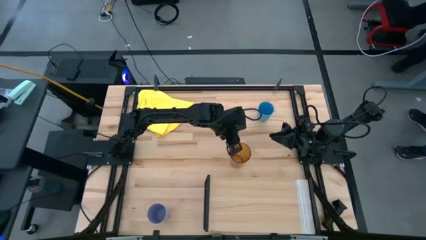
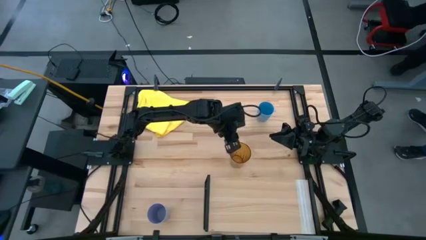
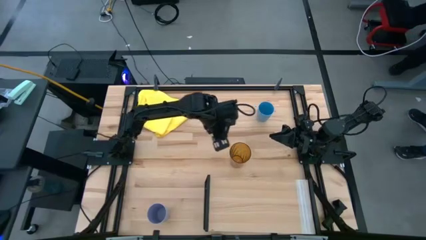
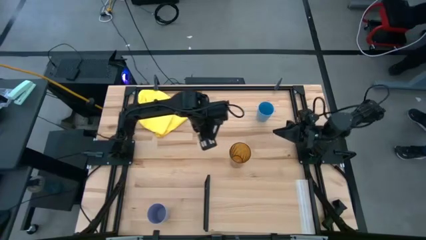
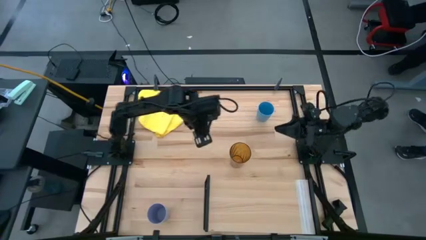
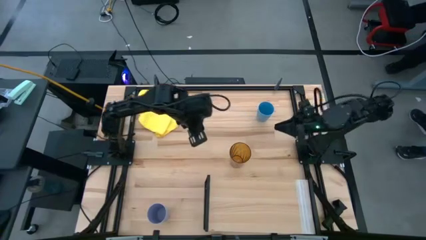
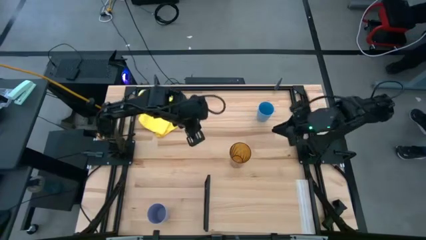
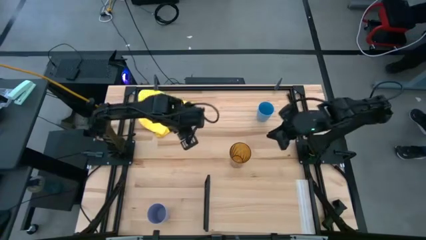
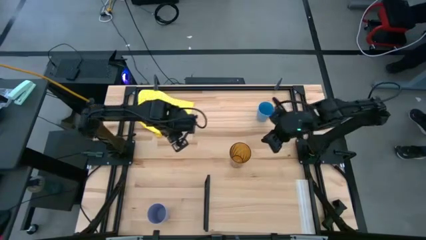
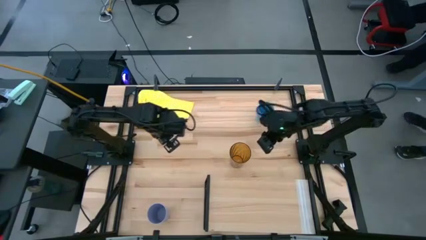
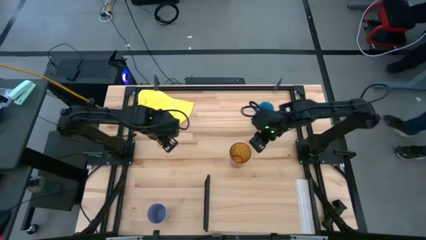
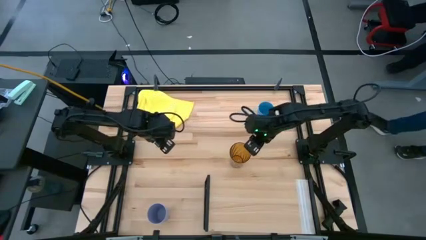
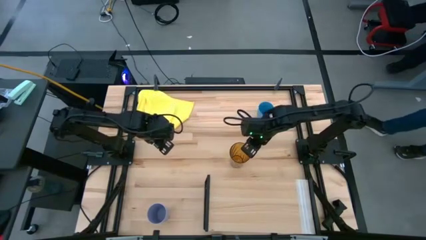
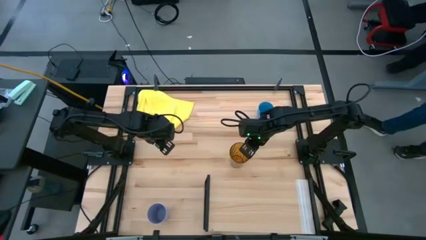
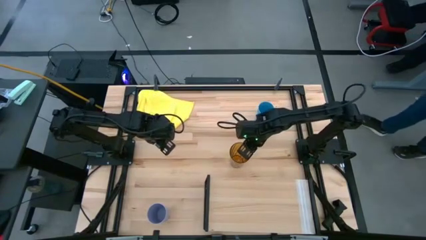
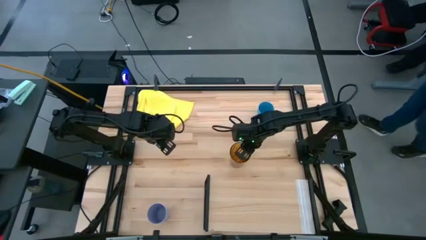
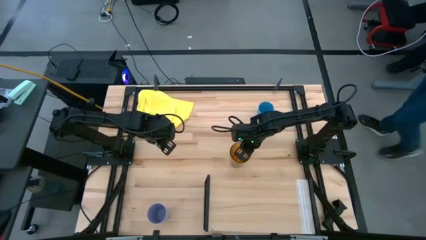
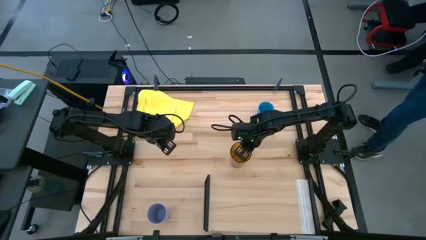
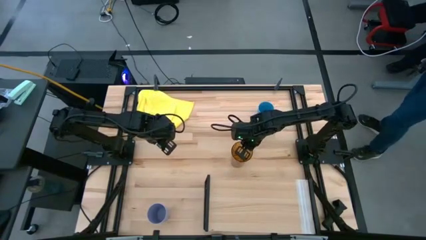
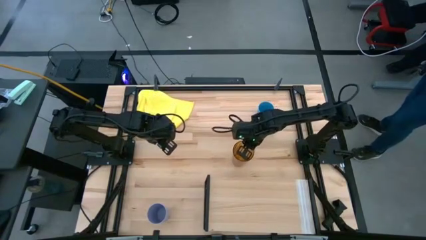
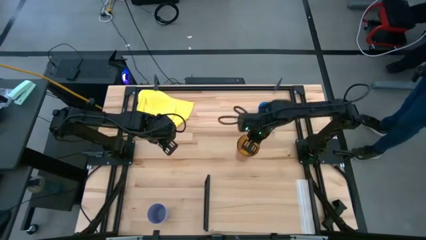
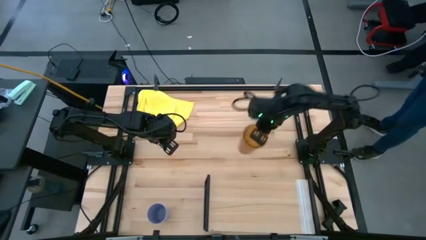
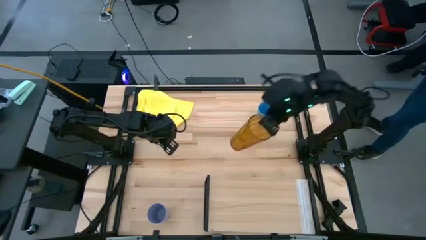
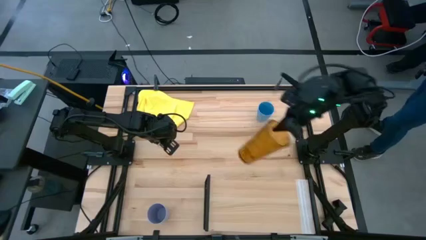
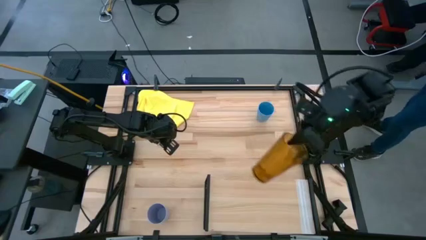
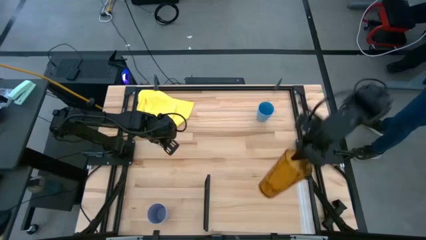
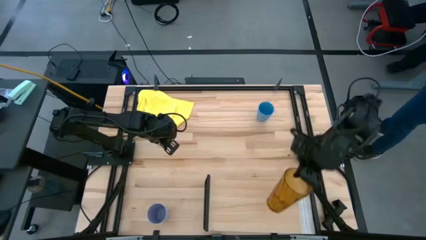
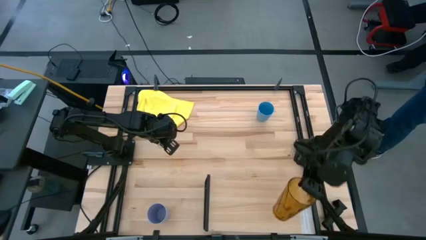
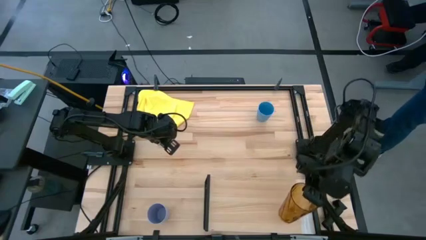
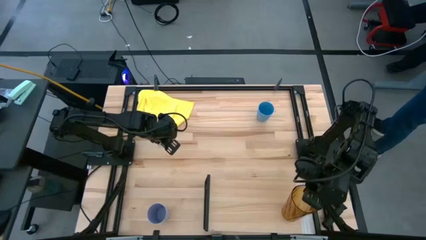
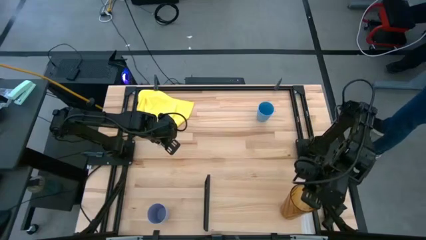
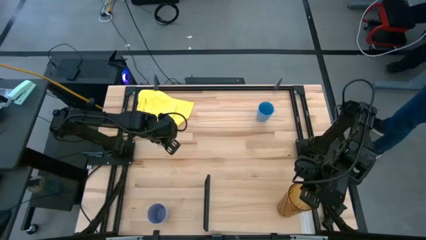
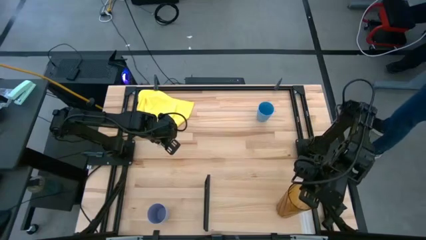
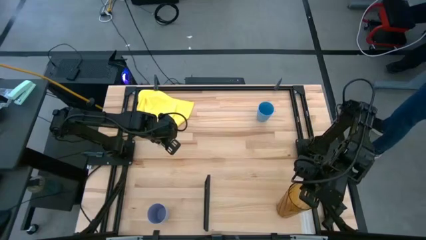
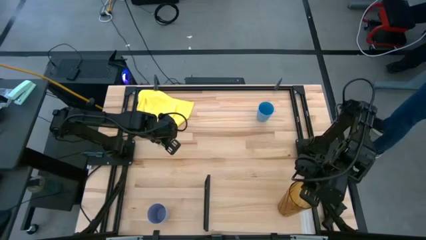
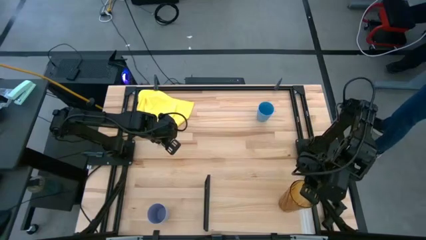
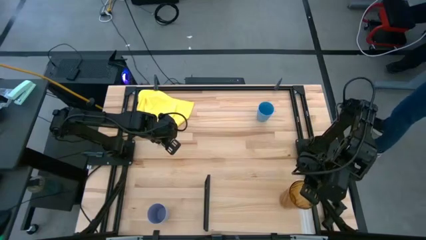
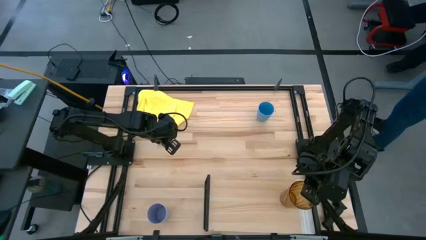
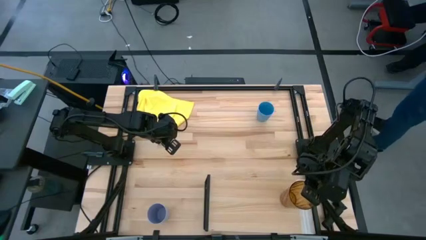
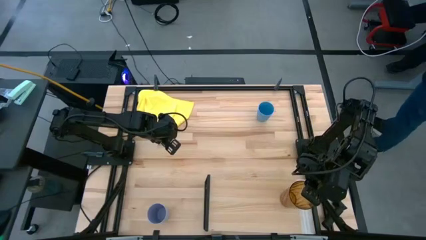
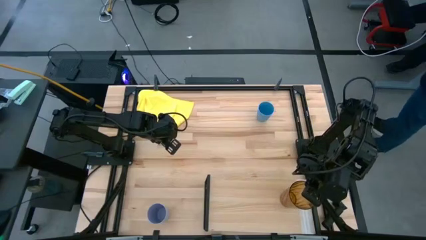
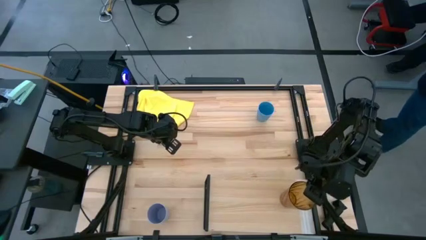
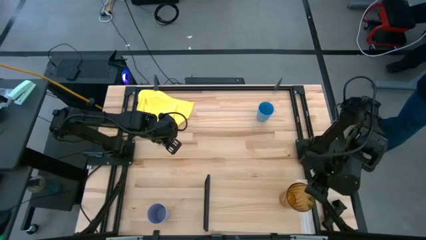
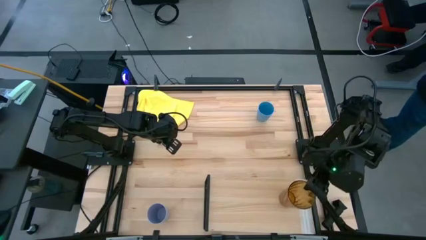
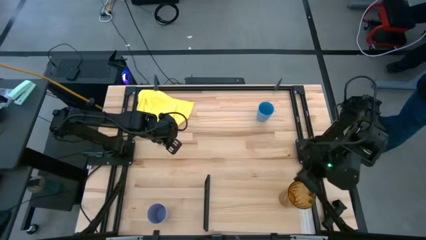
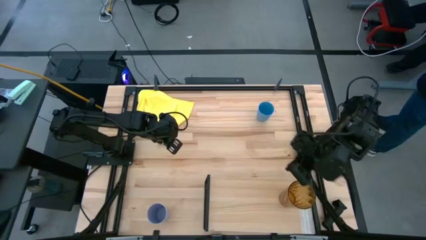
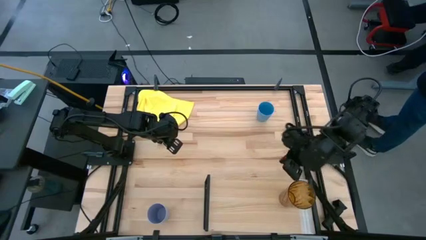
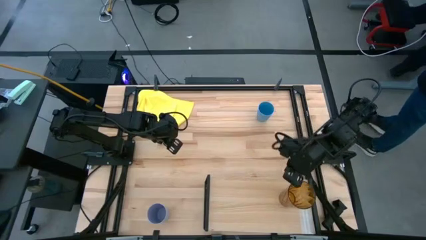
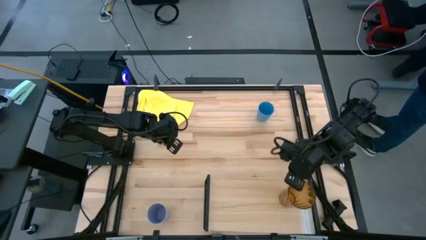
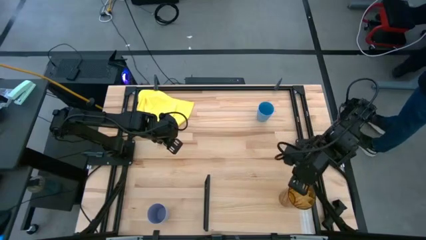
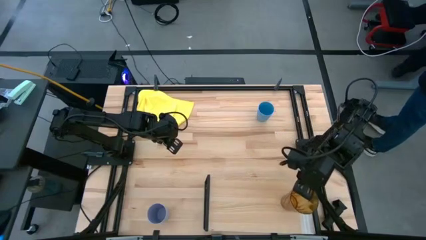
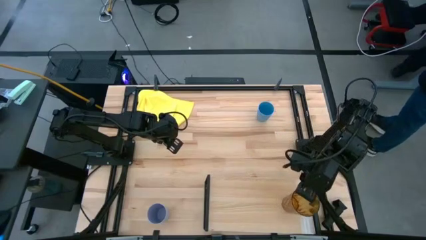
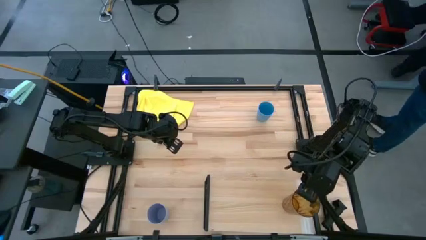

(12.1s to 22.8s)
Task: Stack small to large cups/mugs on shelf
Put the brown cup on the shelf

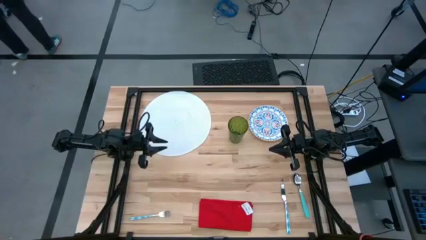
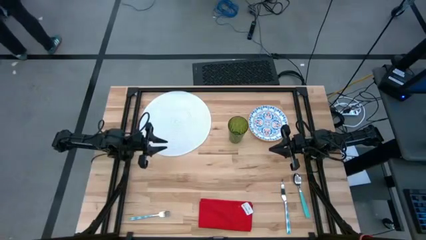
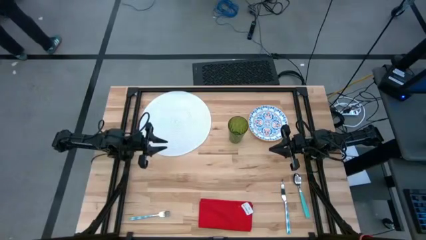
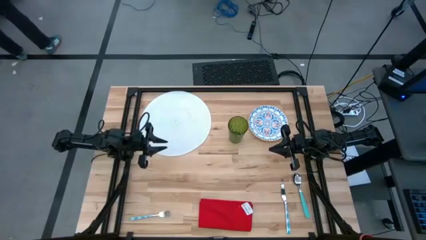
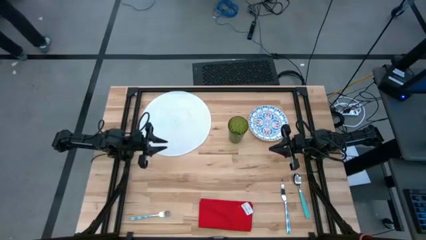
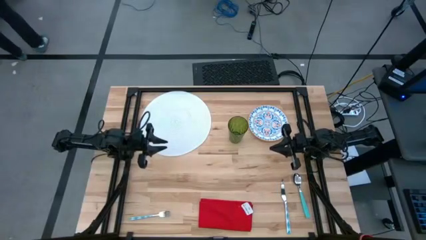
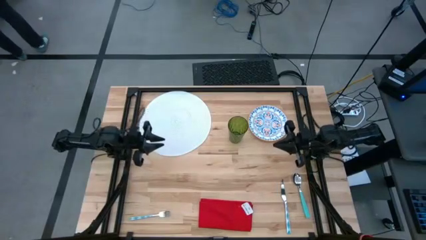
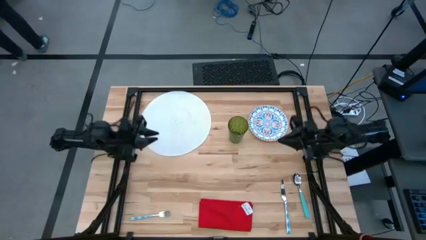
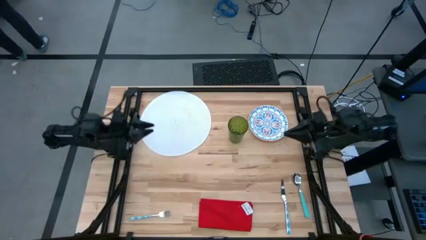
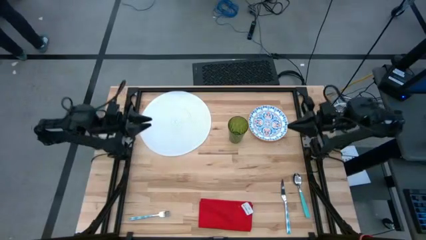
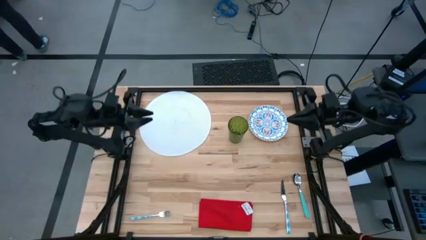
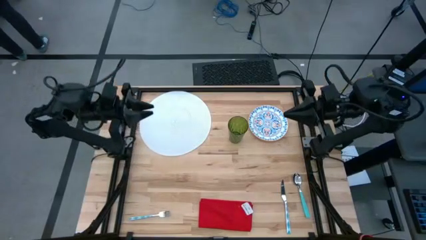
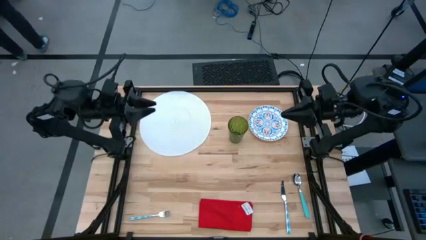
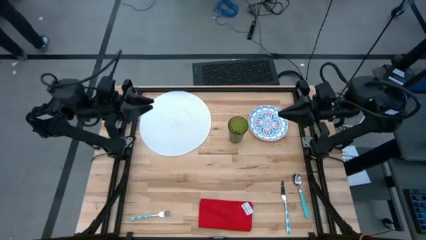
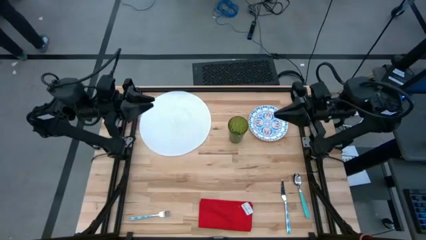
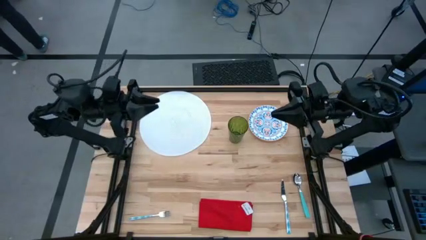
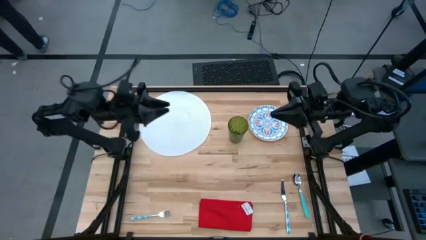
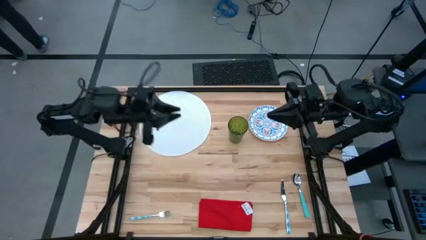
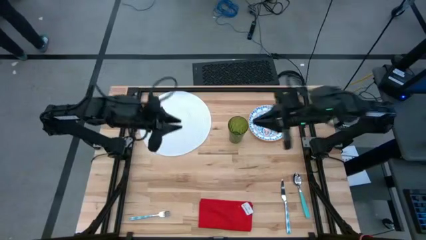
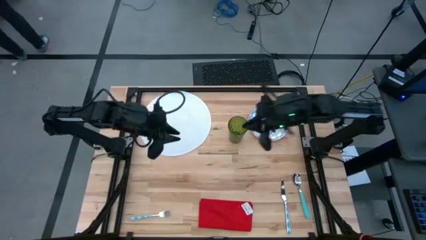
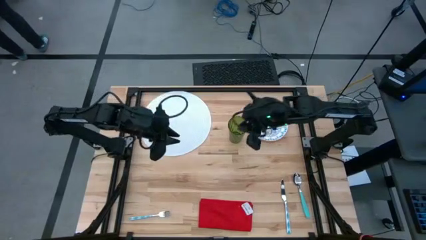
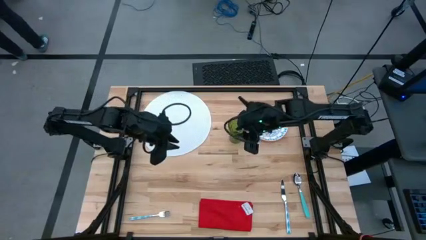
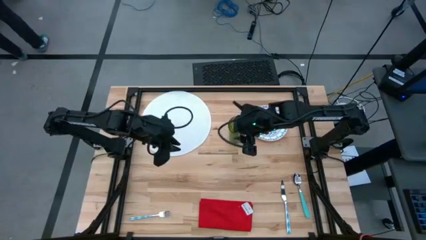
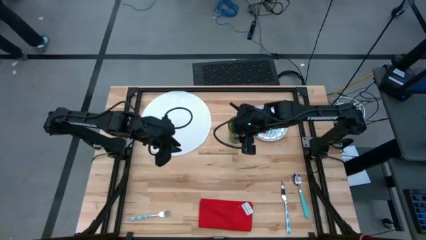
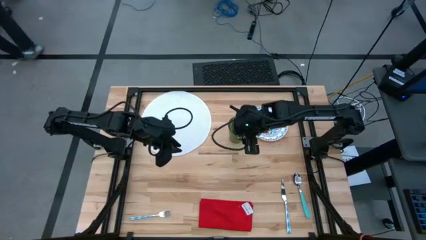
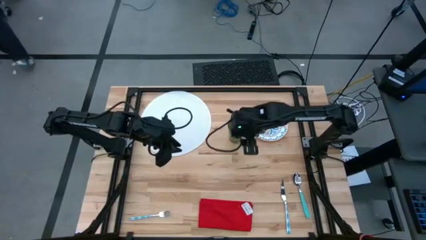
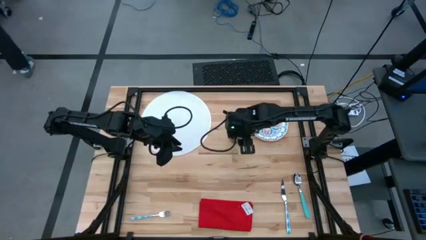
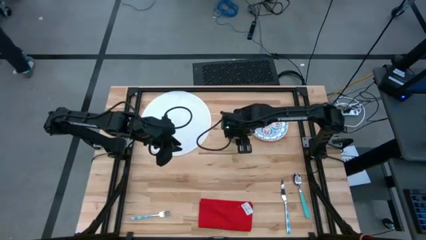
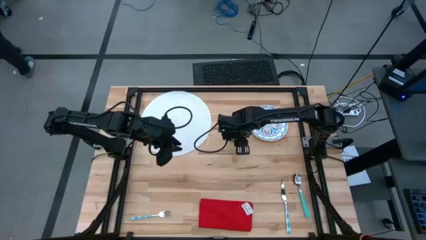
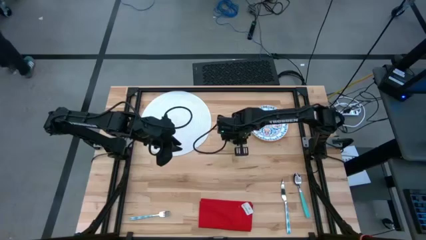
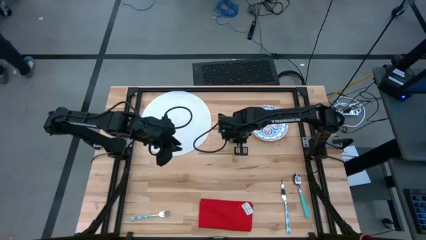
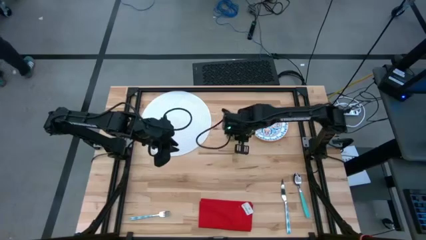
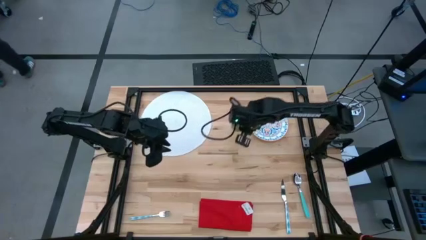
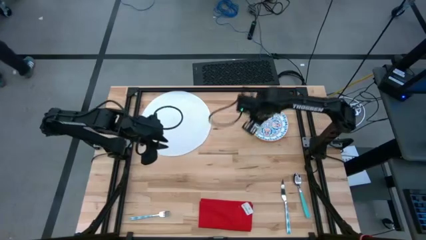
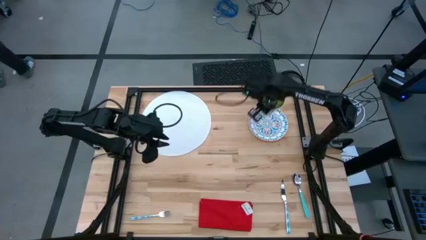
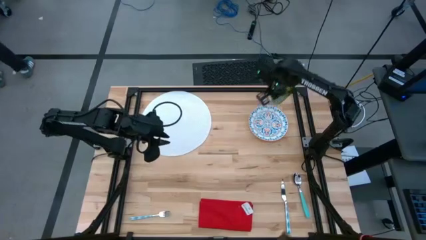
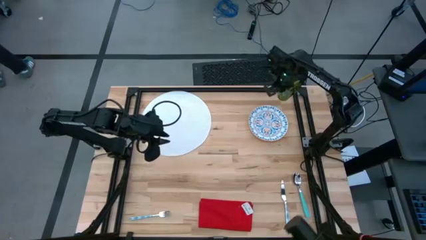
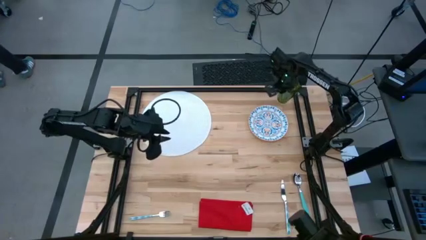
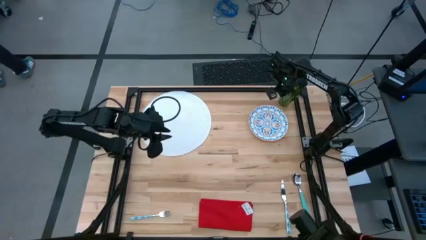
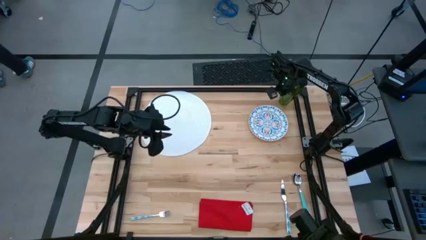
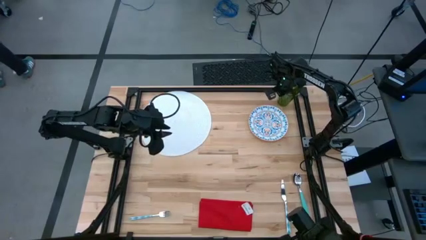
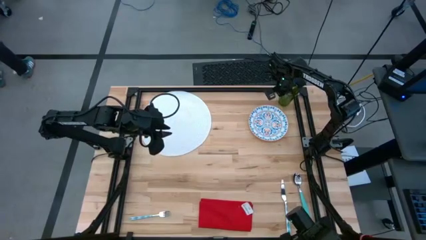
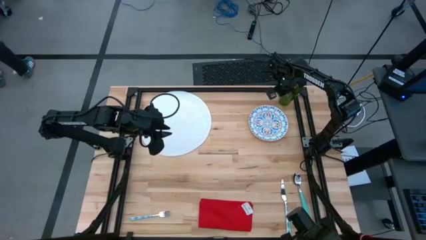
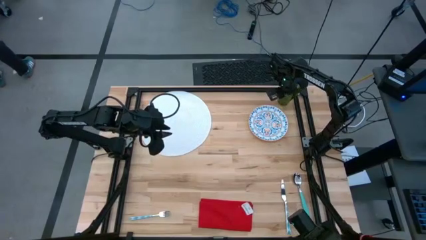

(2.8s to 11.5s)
Task: Set table place
Move the green glass to the top right of the table
